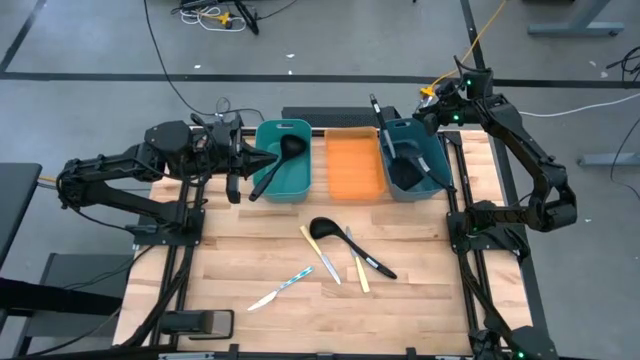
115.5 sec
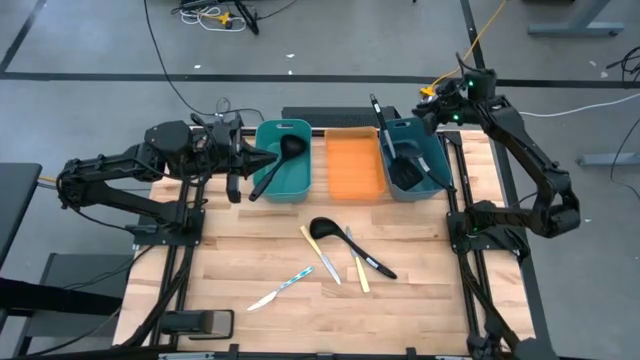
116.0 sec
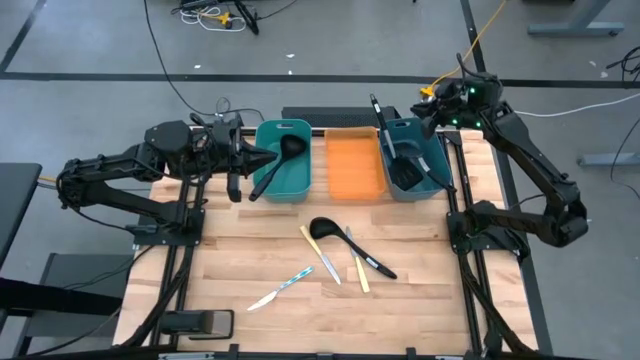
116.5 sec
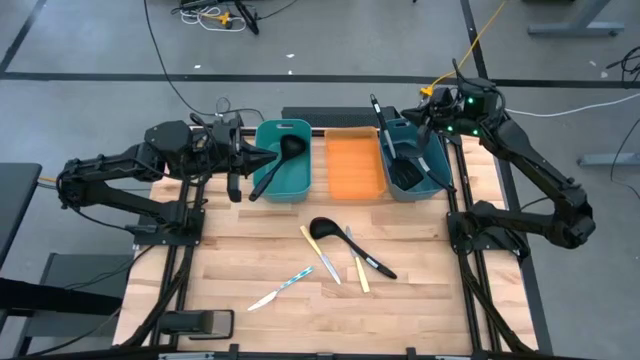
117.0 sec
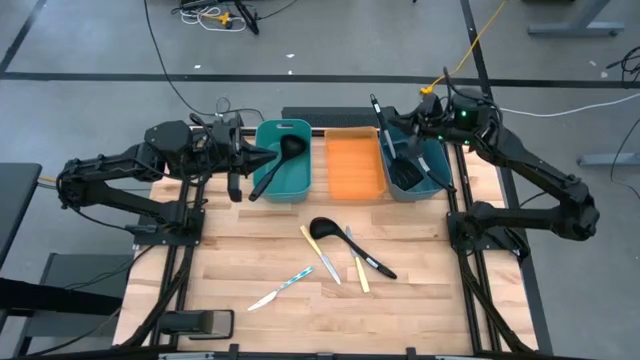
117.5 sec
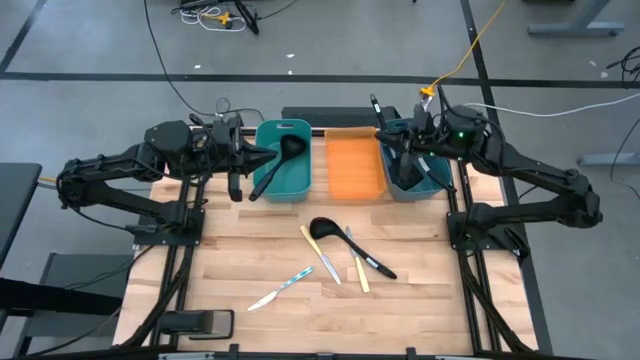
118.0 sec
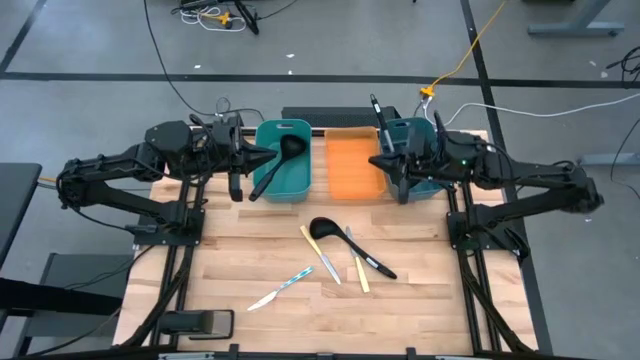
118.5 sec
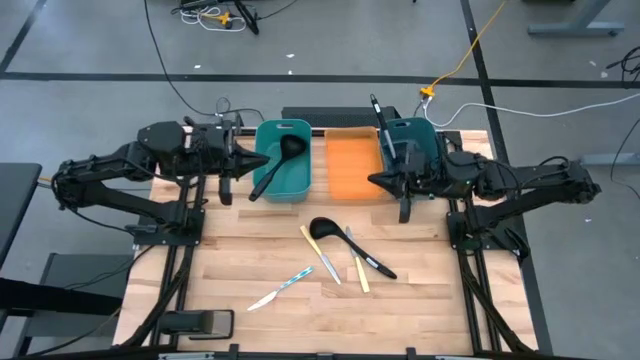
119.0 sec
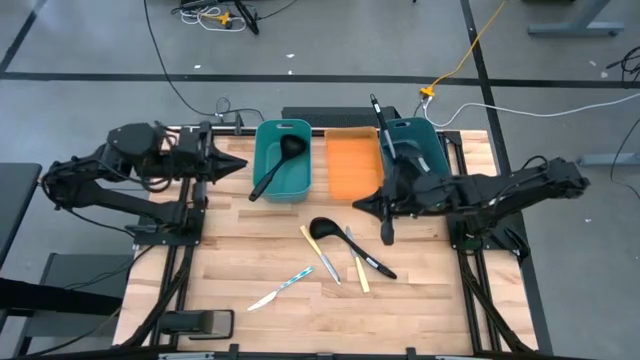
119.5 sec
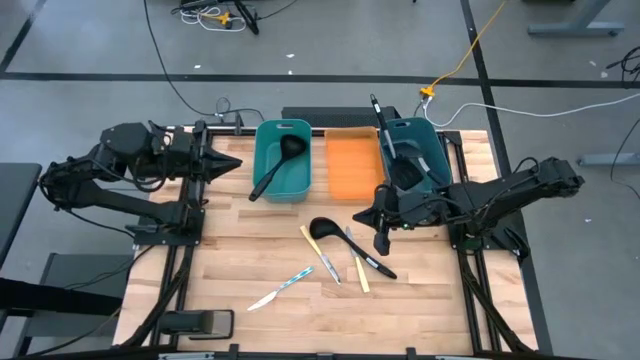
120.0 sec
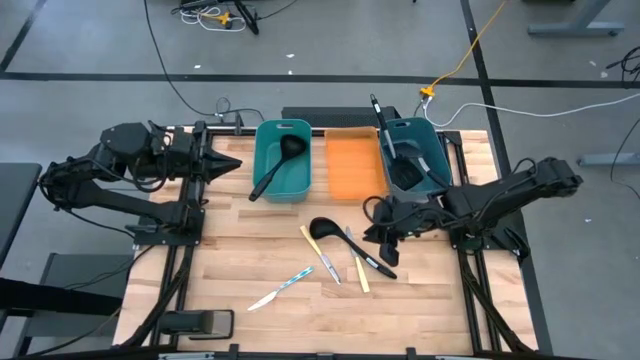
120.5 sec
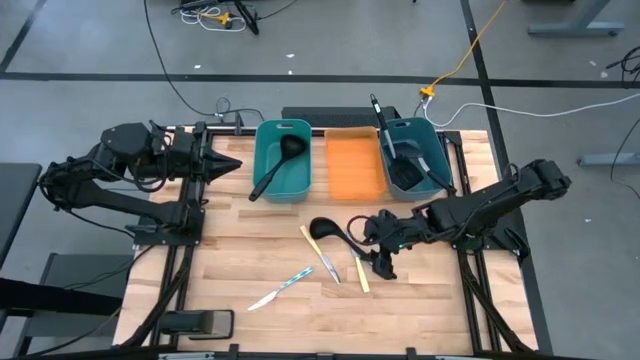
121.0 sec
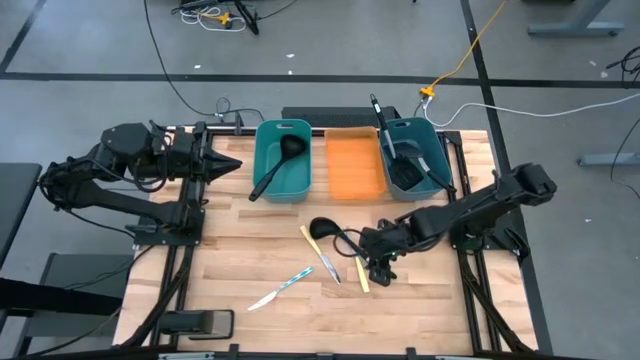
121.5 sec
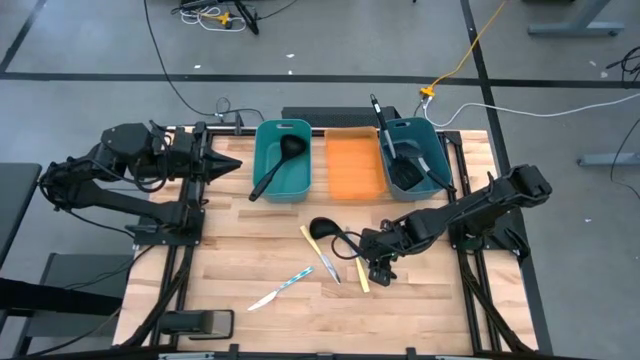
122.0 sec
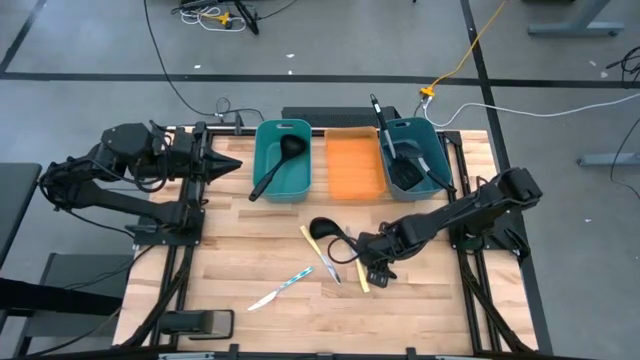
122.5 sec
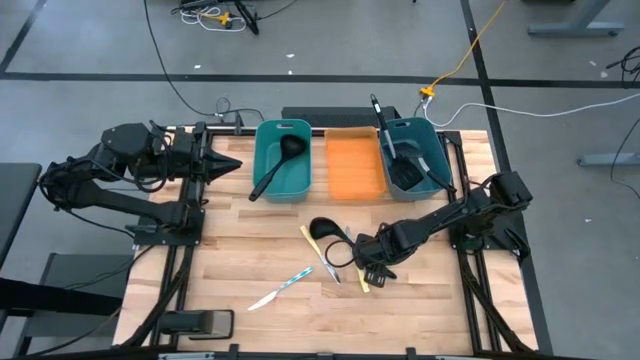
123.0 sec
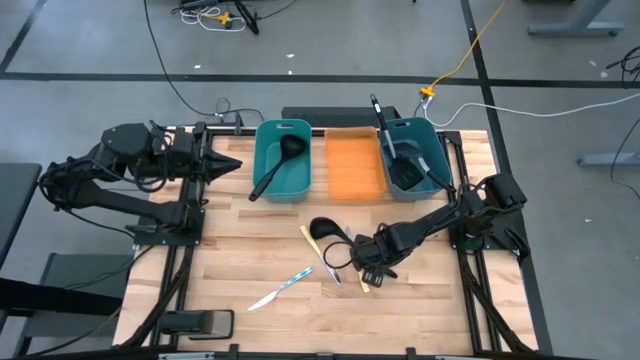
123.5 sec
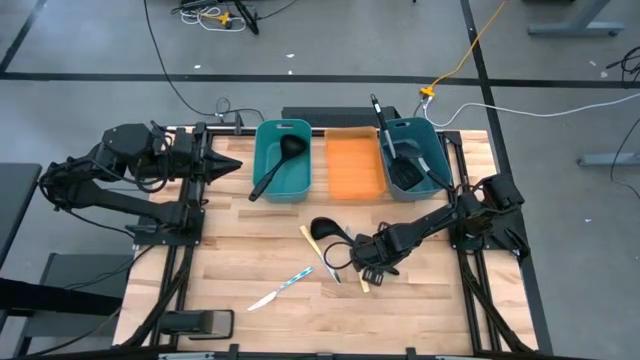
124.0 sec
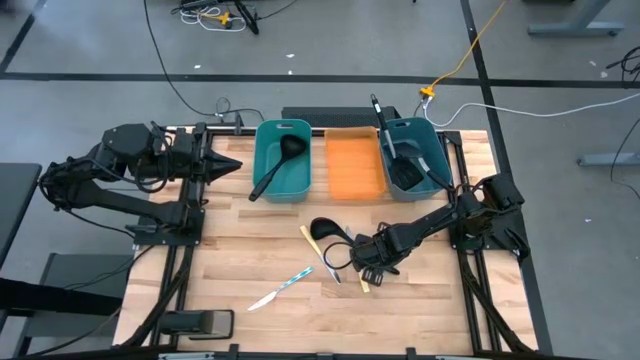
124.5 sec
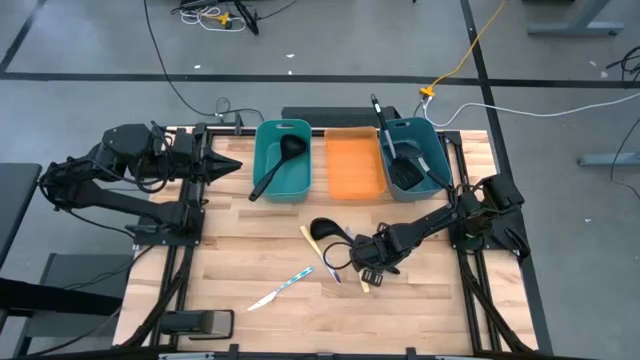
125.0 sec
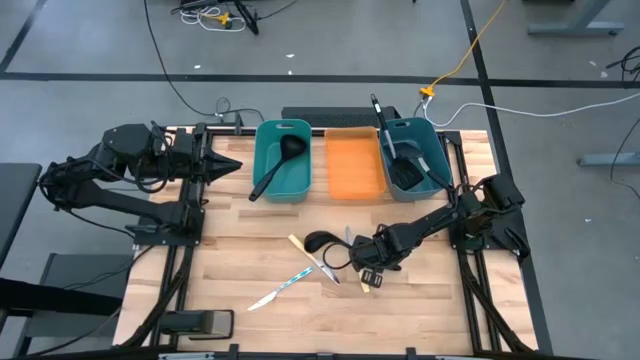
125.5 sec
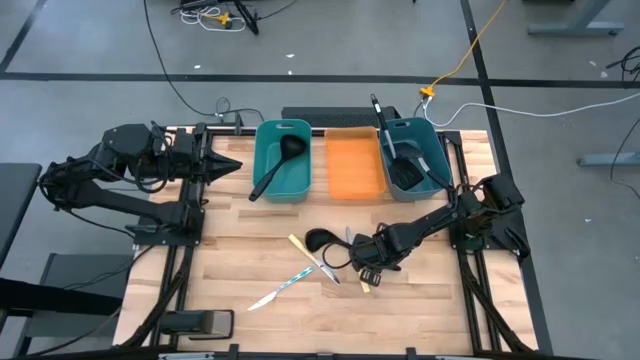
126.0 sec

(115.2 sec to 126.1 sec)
Task: Pick & Place Kitchen Items
Put the black serving spoon into the light green bin

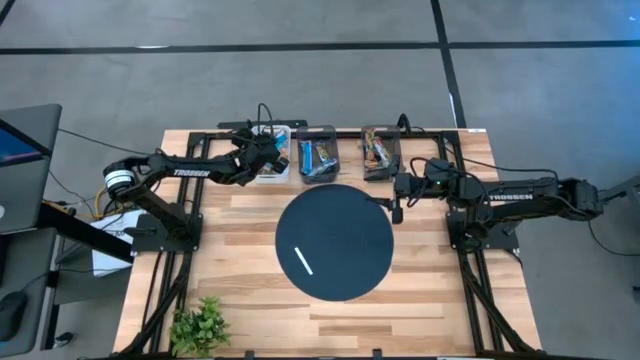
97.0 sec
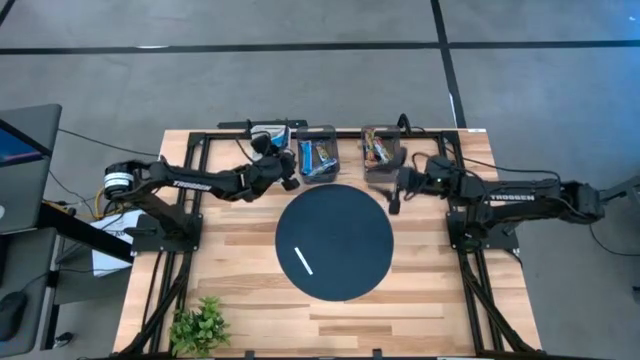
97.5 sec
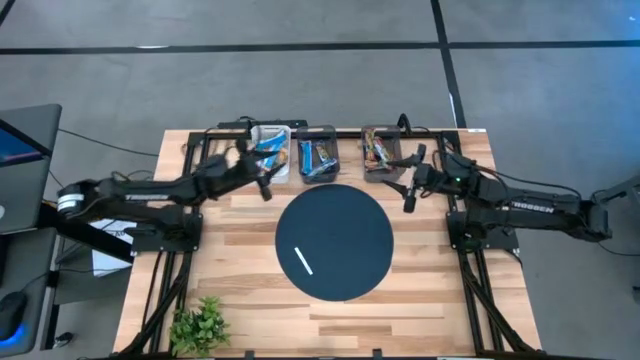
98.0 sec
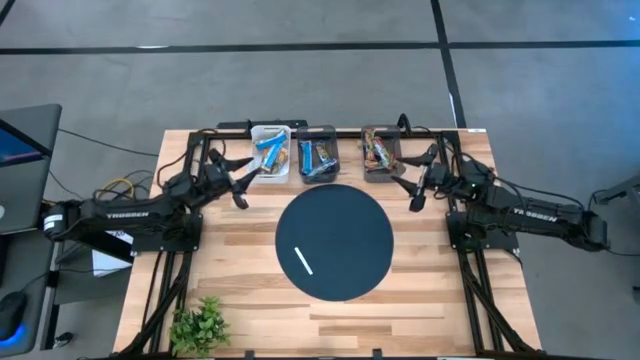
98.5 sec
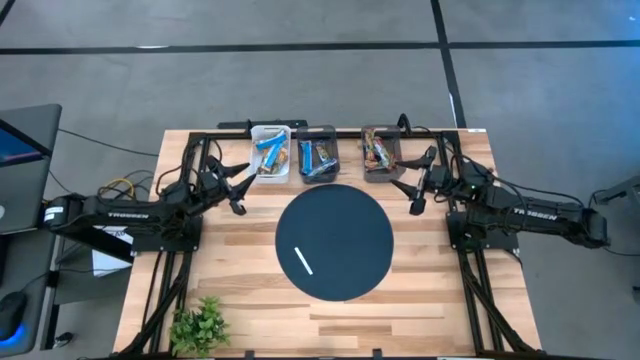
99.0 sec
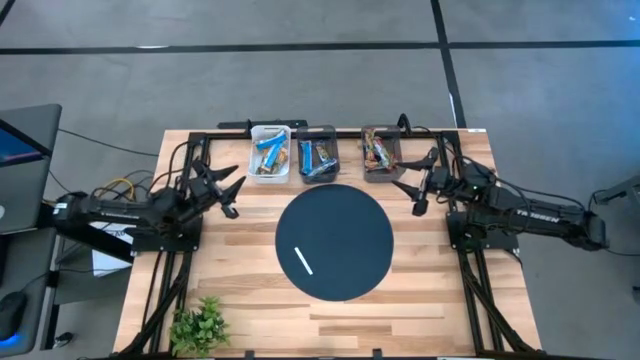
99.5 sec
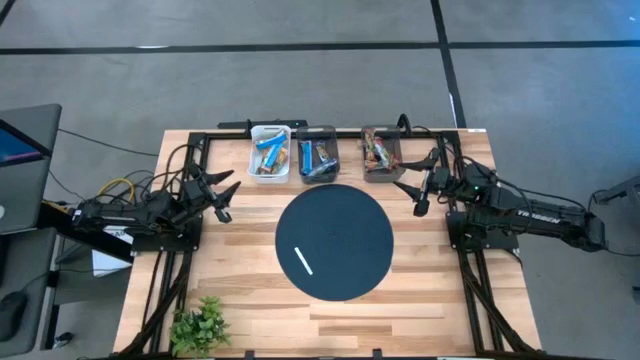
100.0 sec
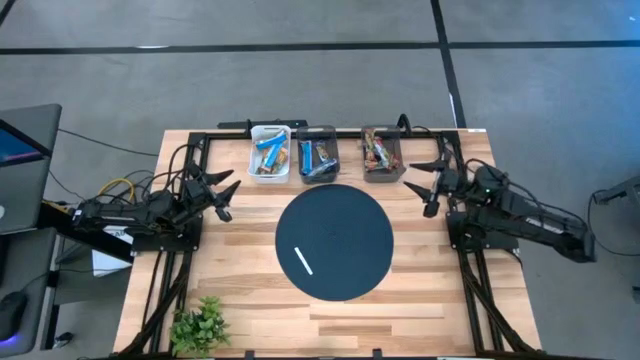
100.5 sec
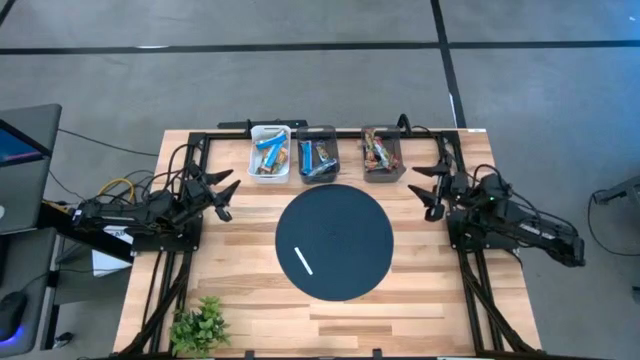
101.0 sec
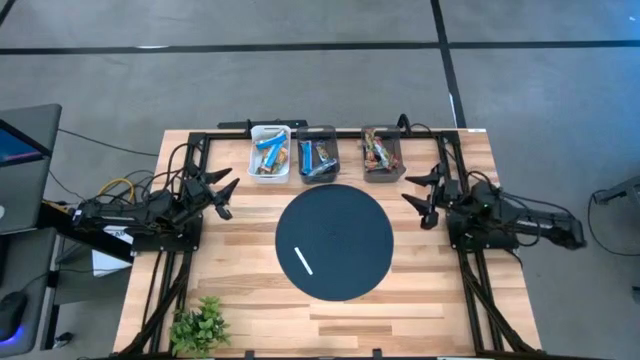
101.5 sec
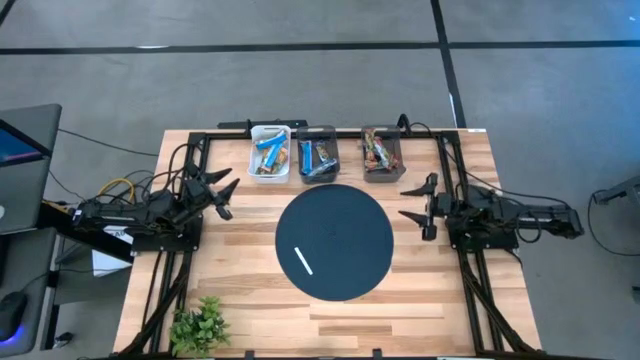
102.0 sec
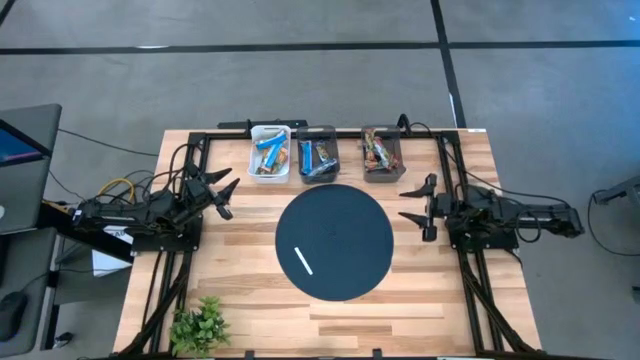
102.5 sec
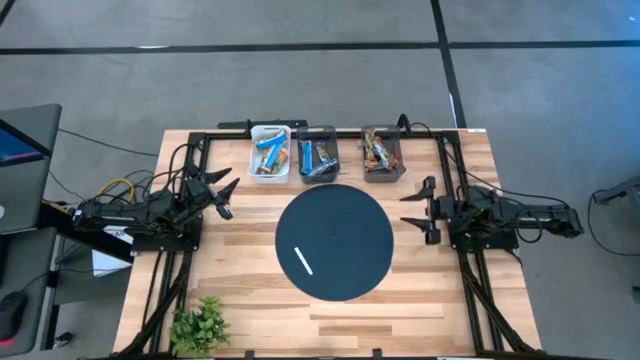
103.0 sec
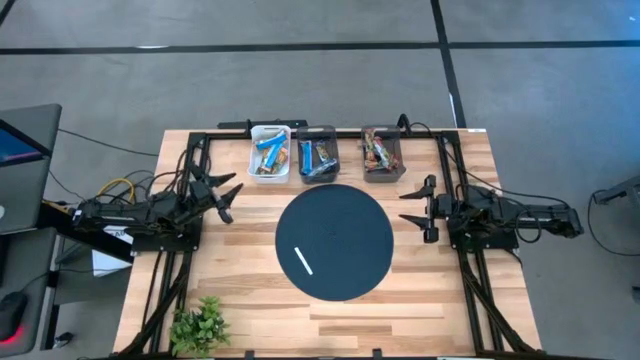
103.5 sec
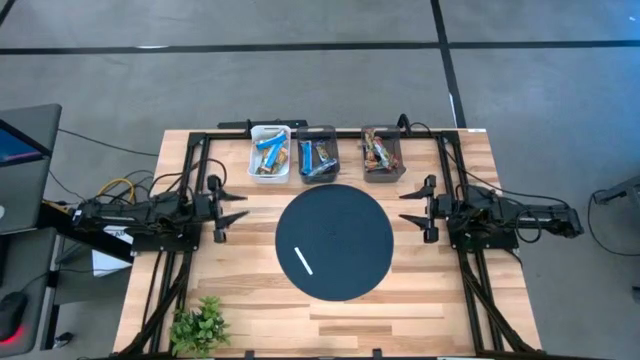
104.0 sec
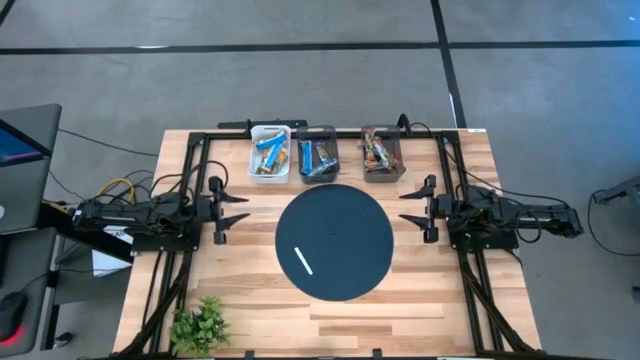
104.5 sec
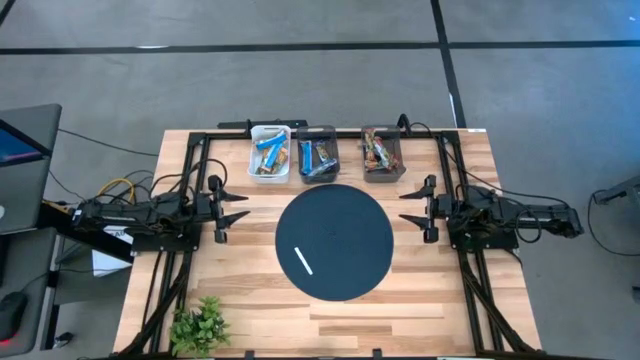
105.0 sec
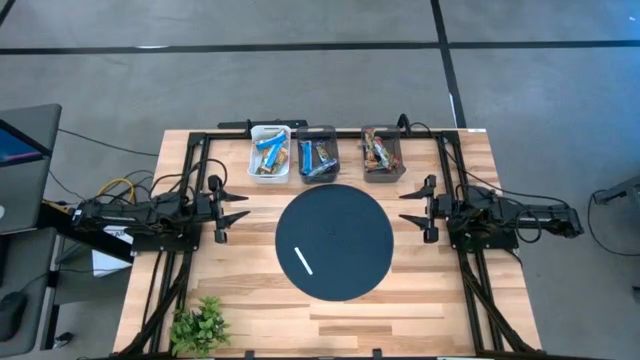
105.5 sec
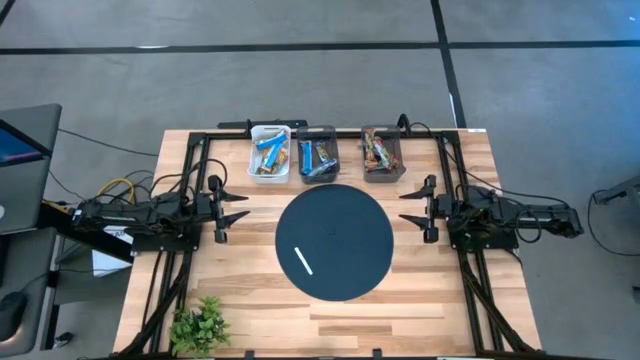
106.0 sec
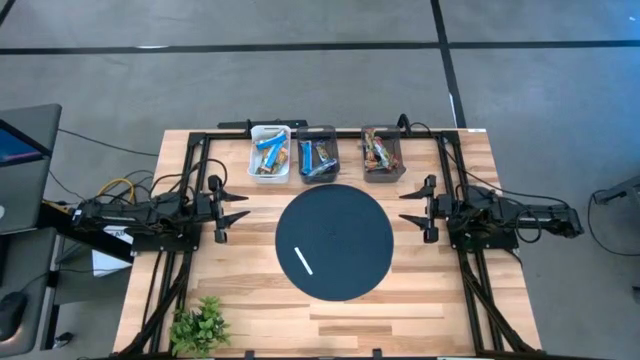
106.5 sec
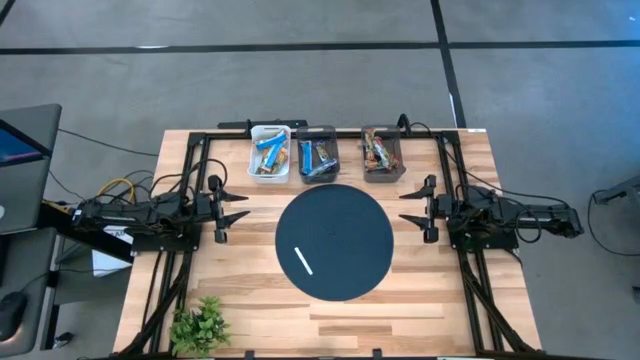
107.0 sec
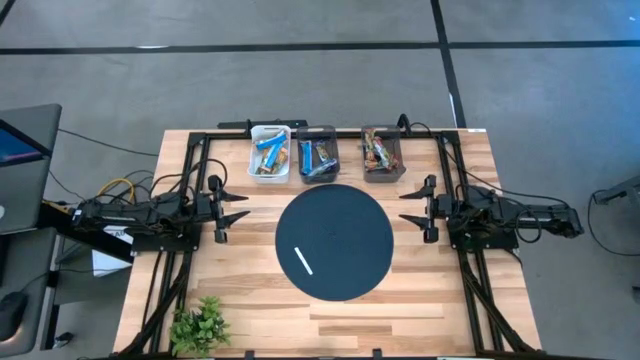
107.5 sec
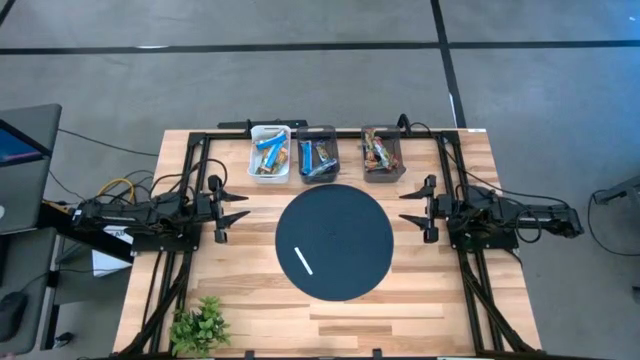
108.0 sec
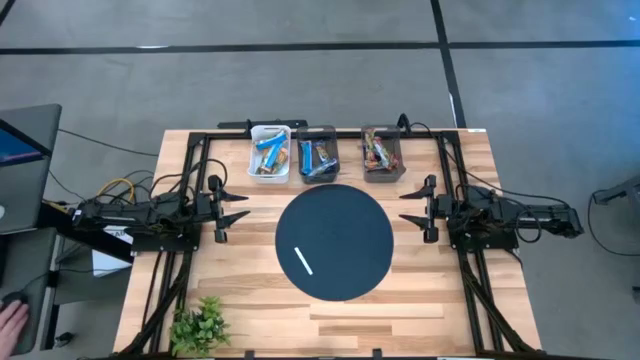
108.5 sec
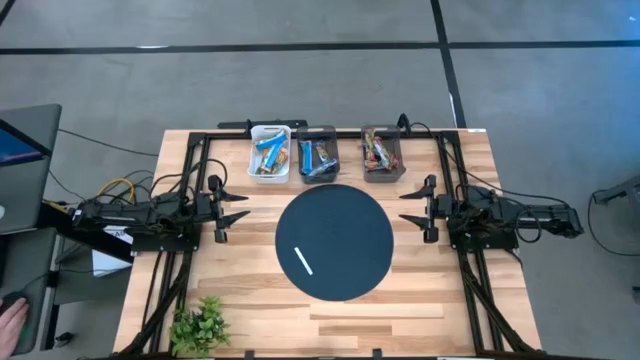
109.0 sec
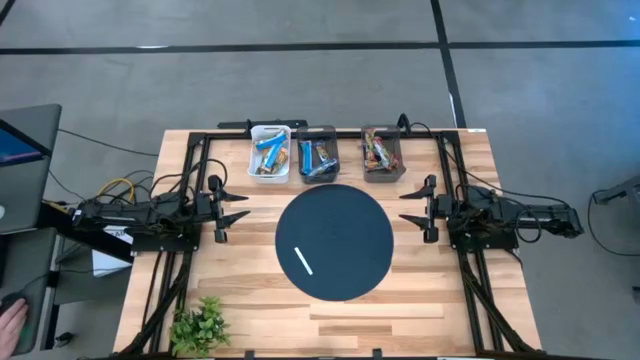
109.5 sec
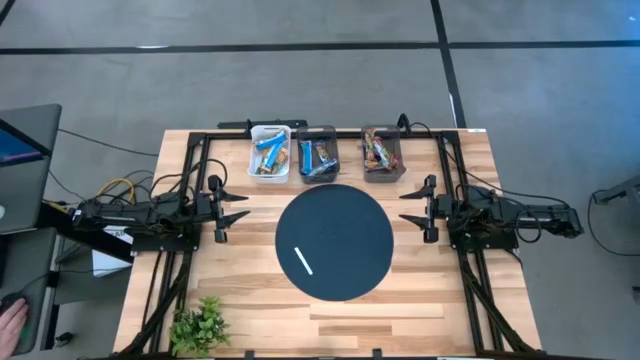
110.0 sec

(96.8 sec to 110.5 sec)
Task: Pick and place Granola Bars by type
Return to Home Position
